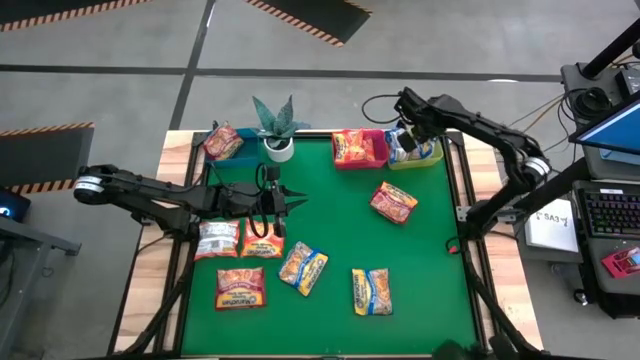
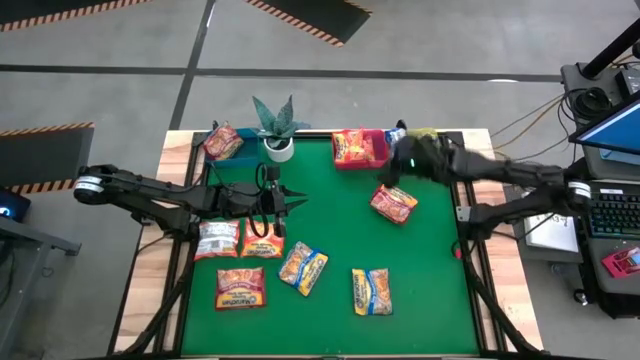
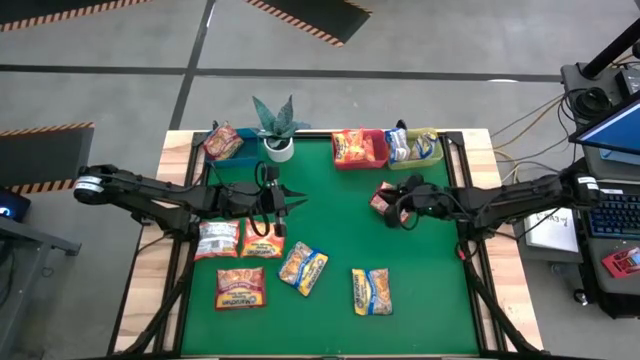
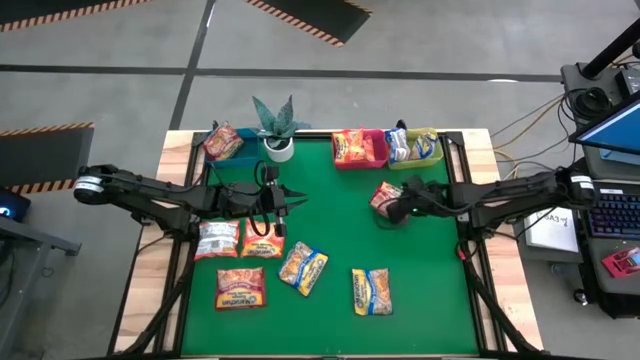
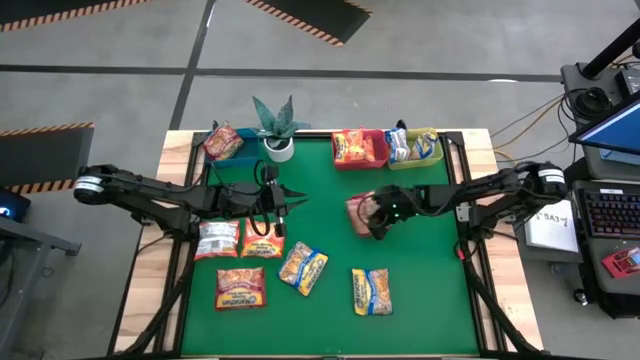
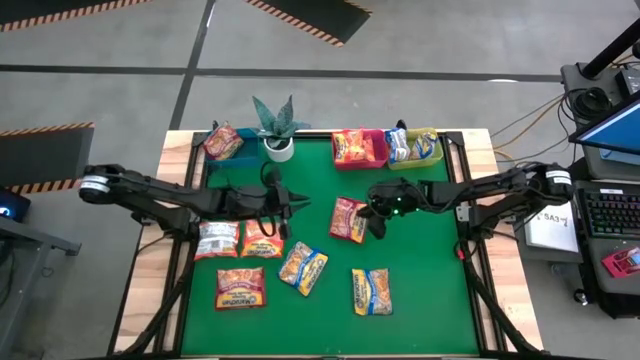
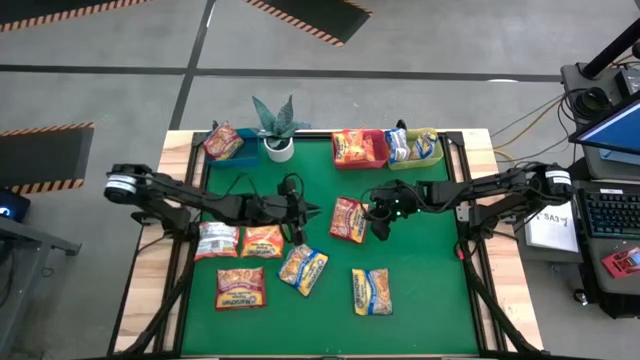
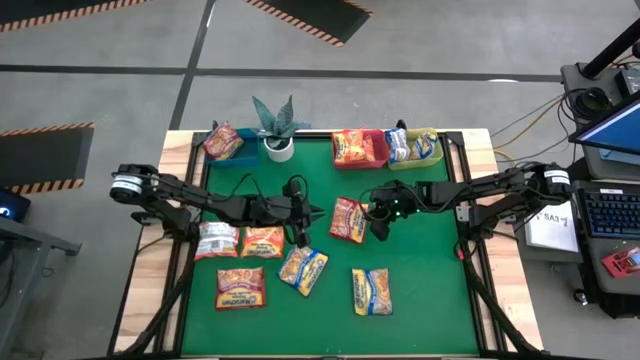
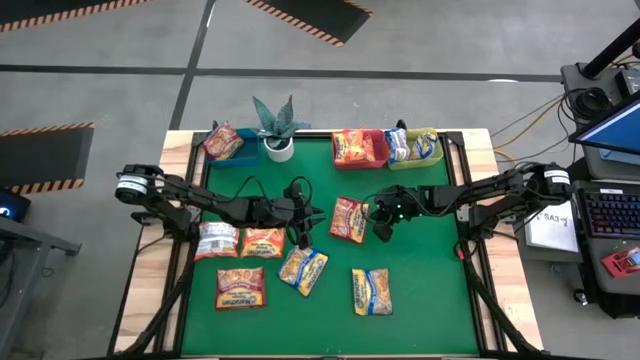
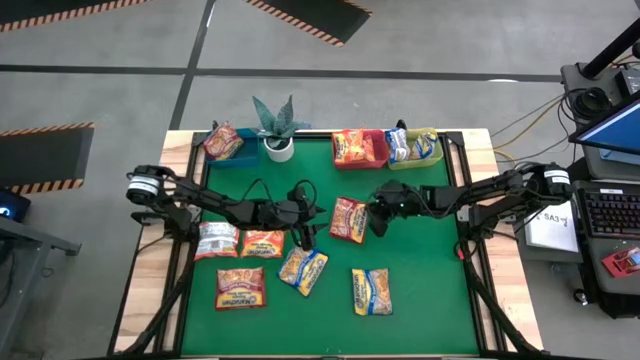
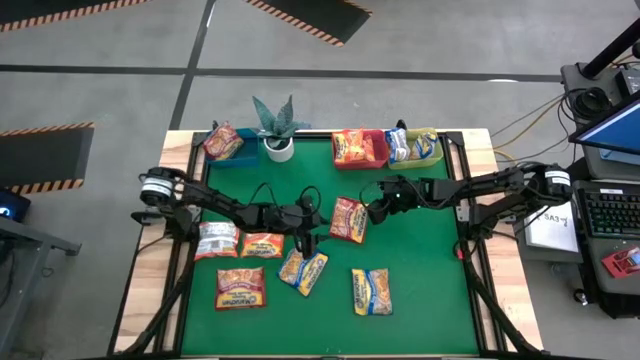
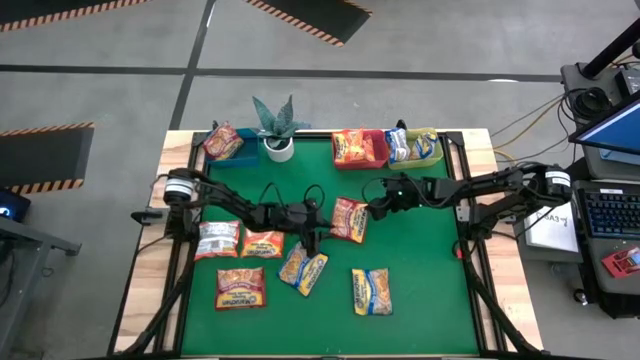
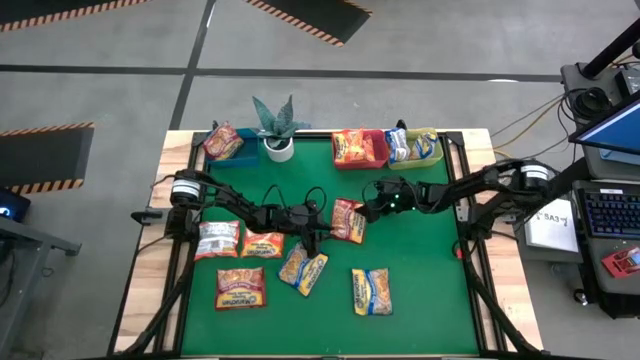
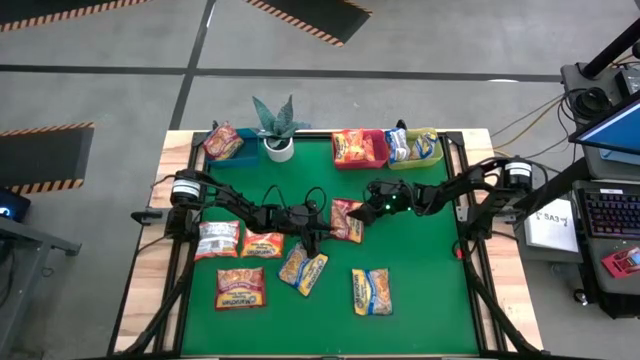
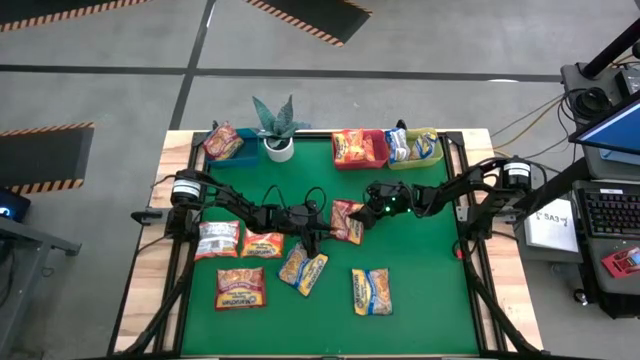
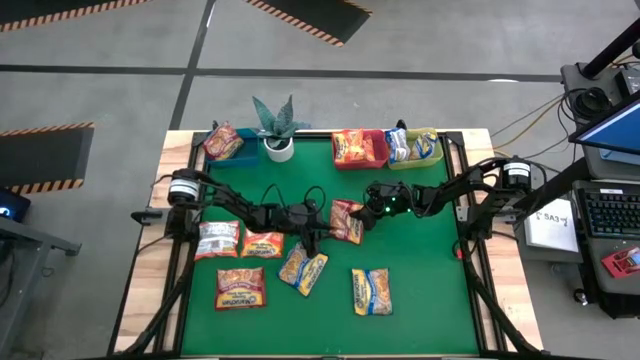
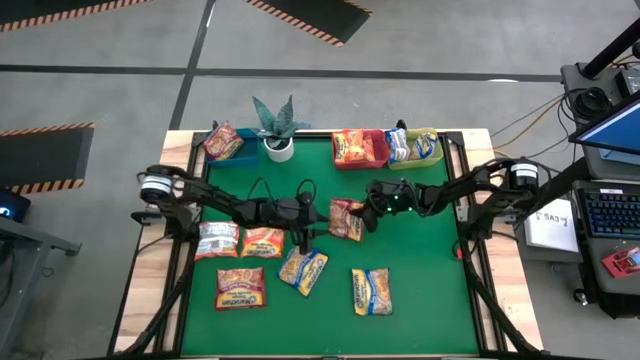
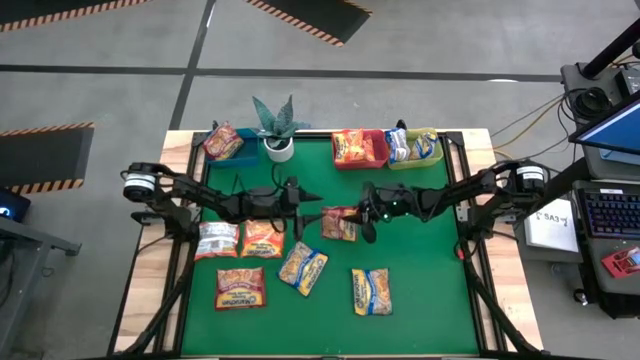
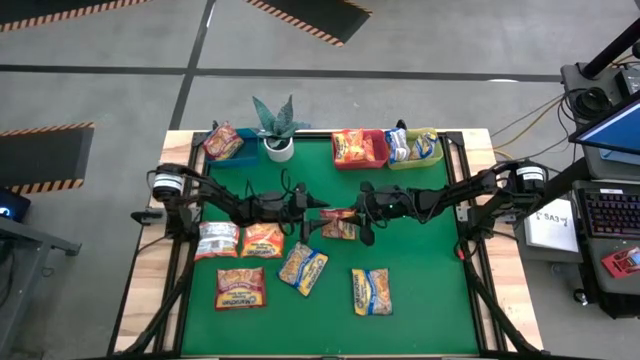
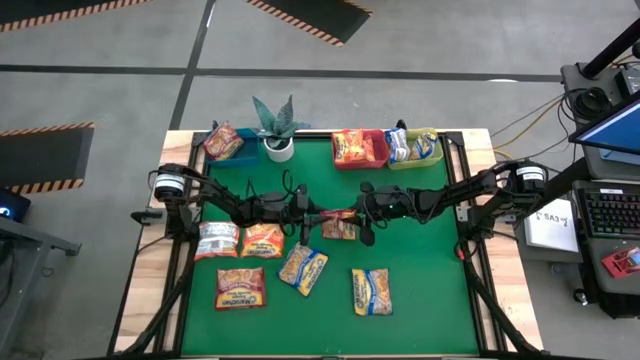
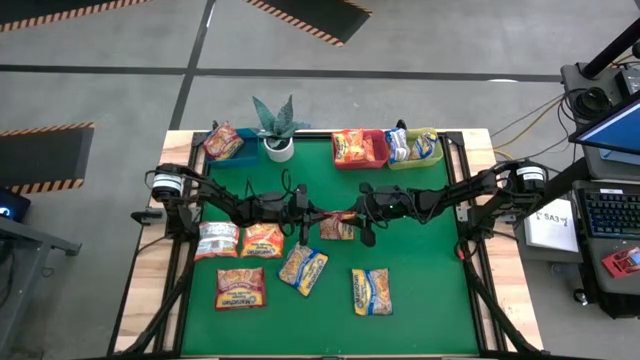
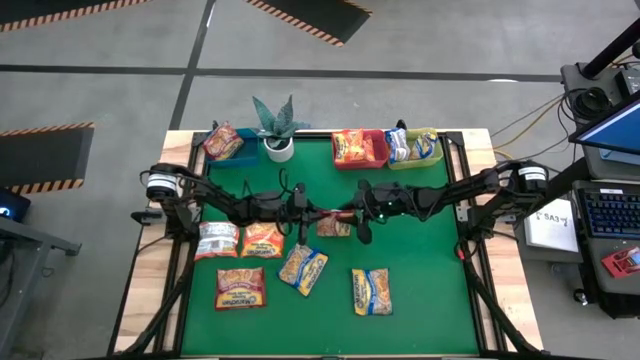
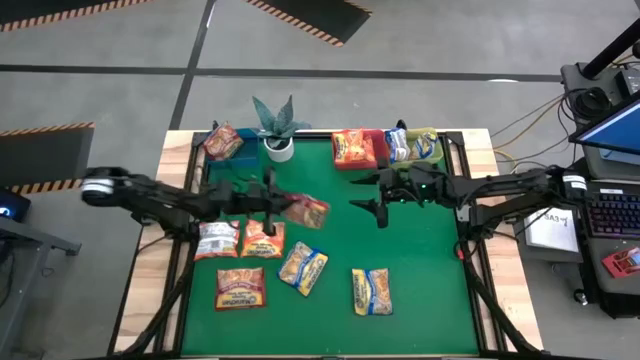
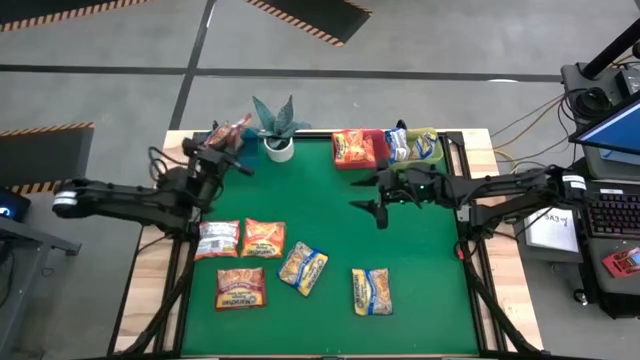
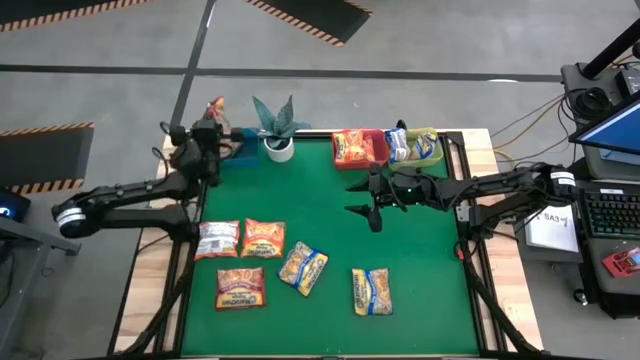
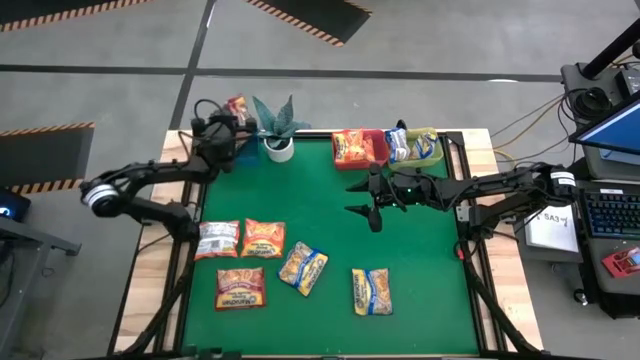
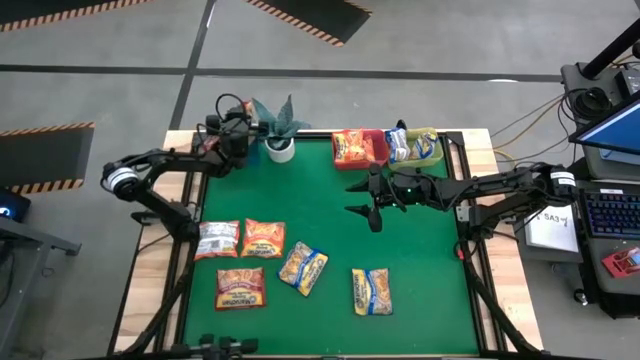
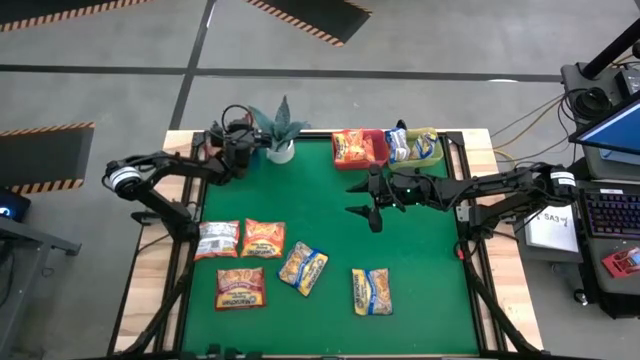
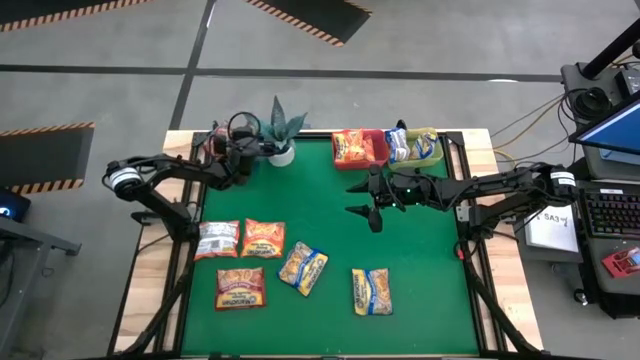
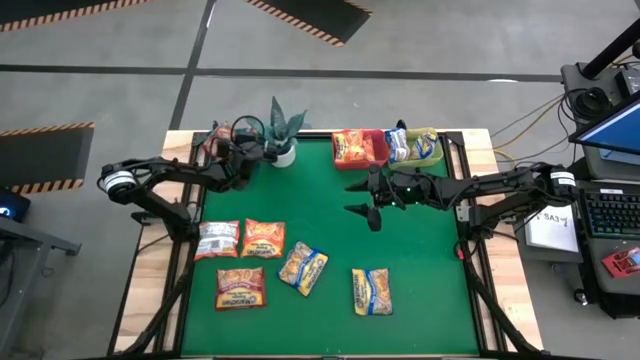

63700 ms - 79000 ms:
Task: Sort Maruchan noodles
Put the red noodle pack into the blue bin

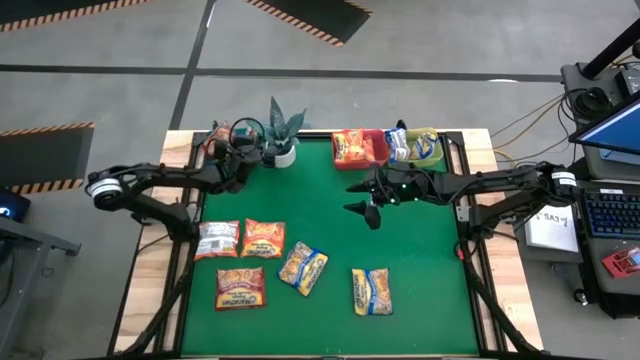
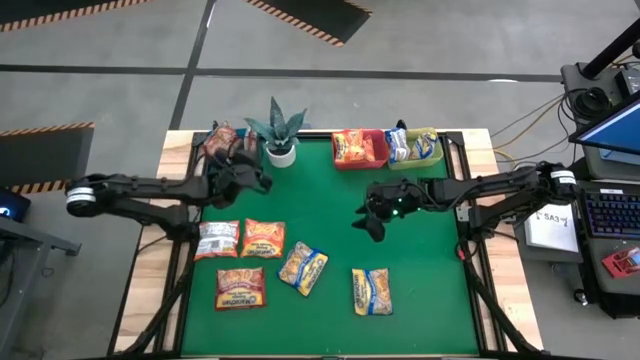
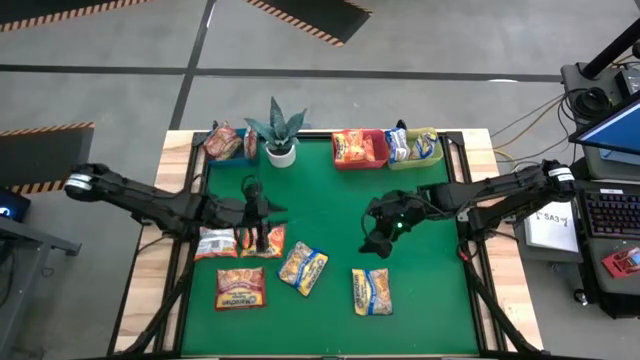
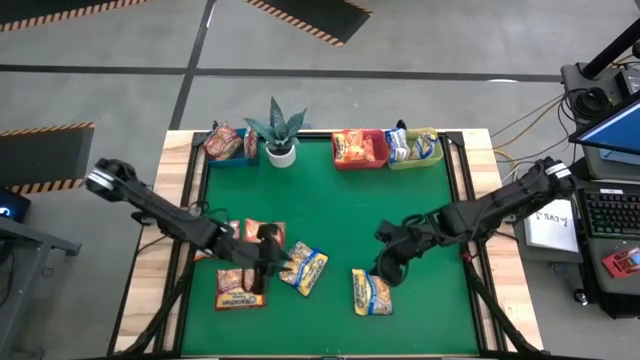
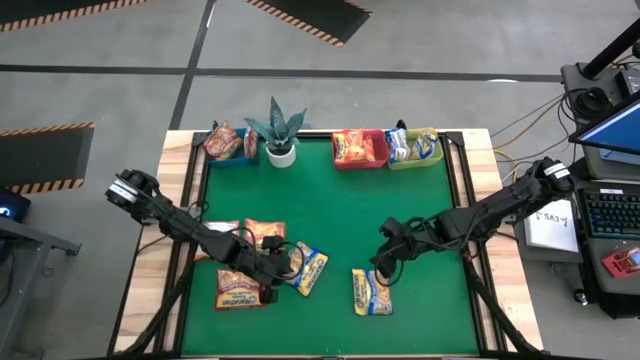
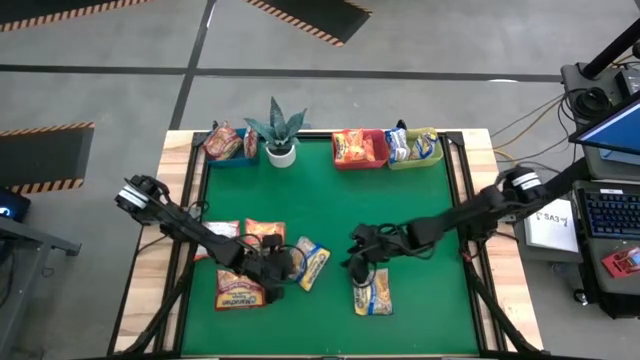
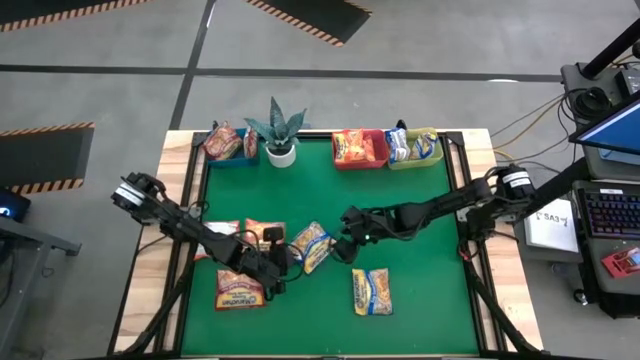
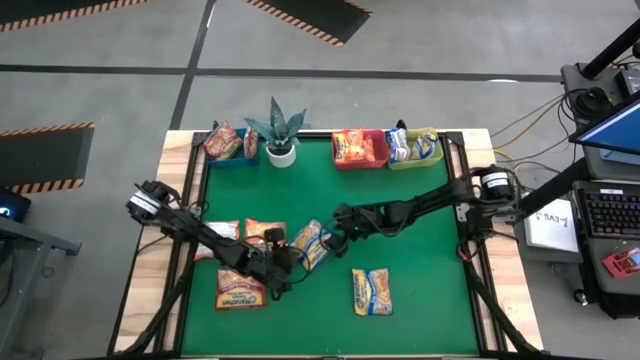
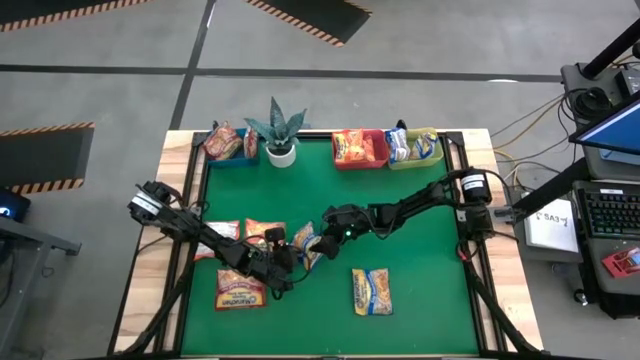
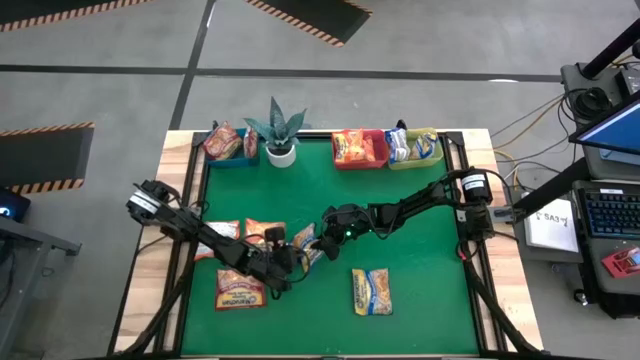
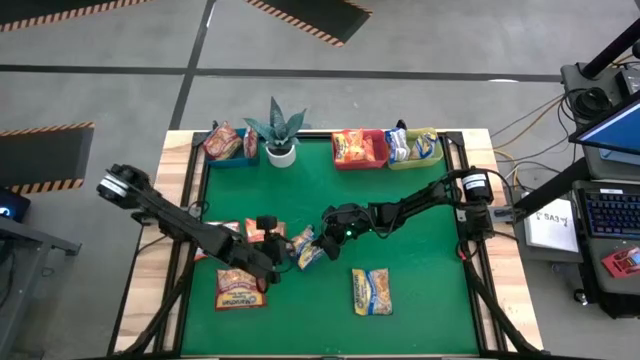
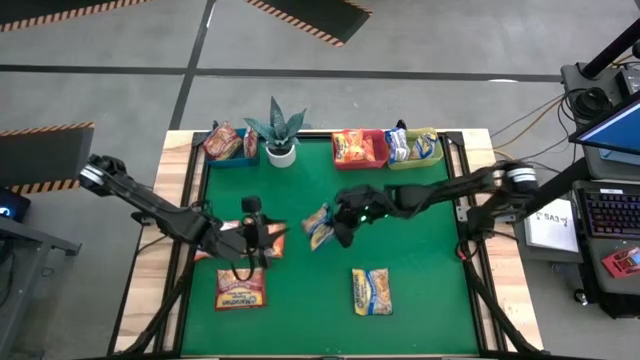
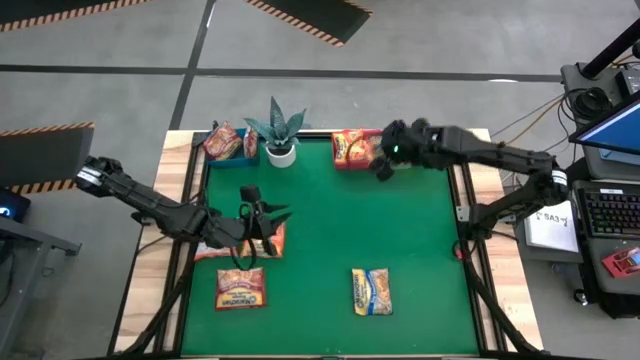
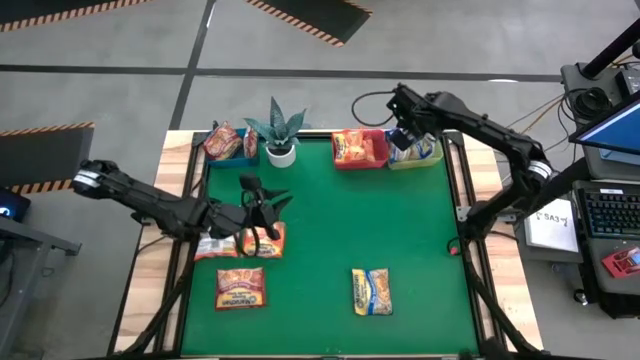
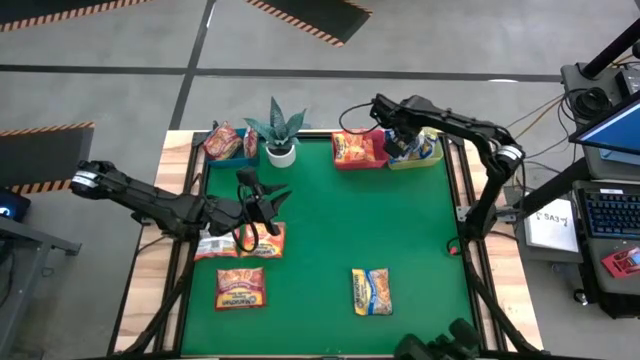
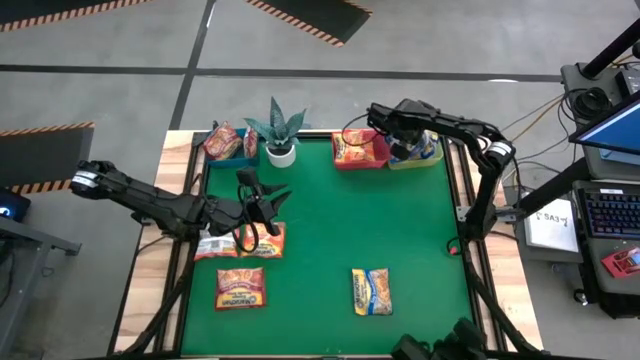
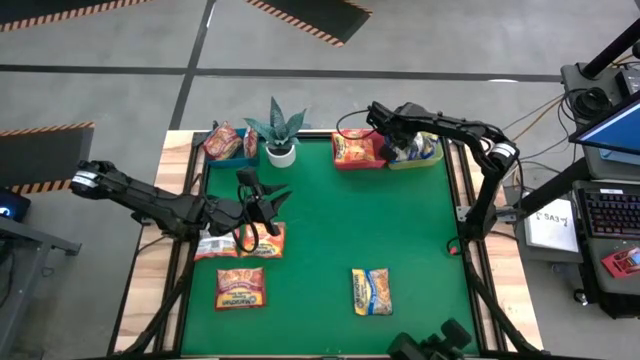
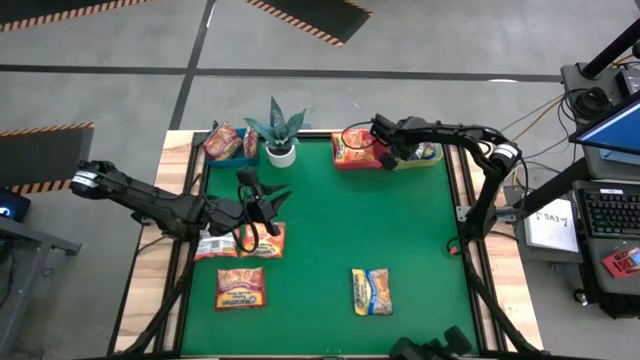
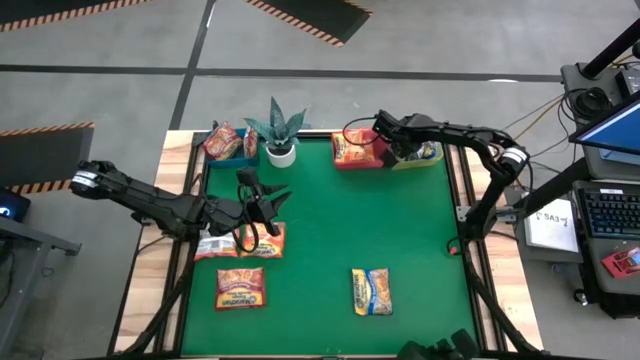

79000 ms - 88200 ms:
Put the blue noodle pack into the yellow bin
